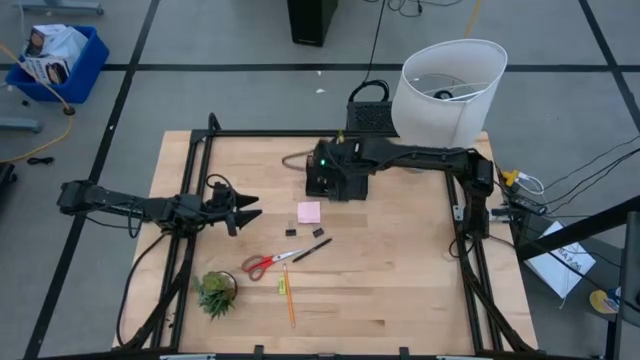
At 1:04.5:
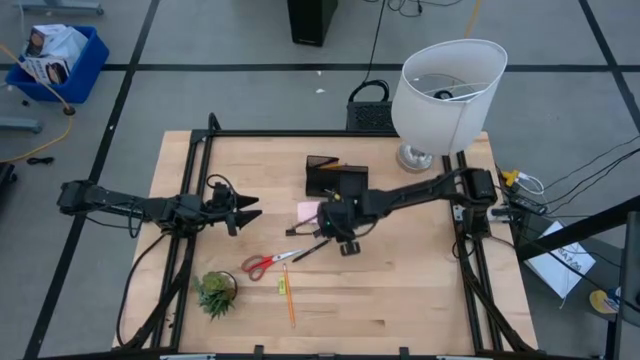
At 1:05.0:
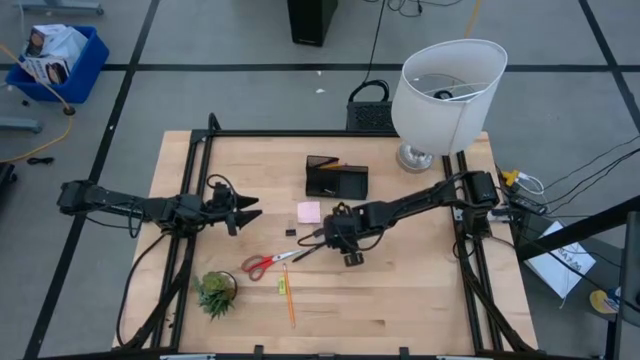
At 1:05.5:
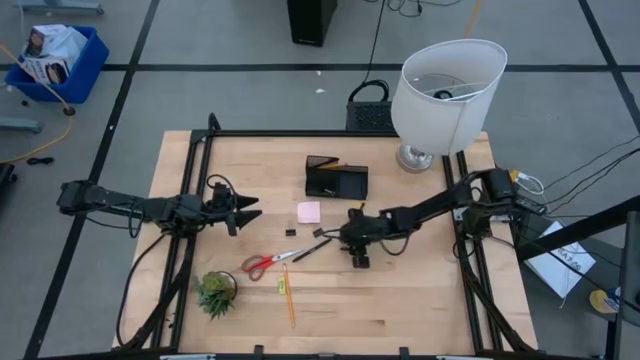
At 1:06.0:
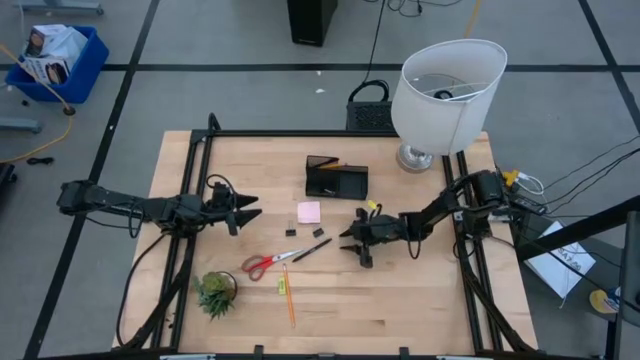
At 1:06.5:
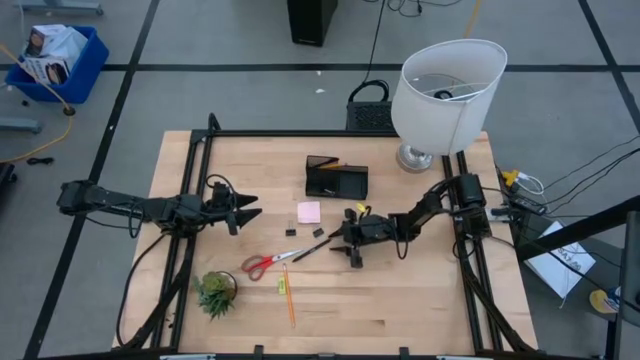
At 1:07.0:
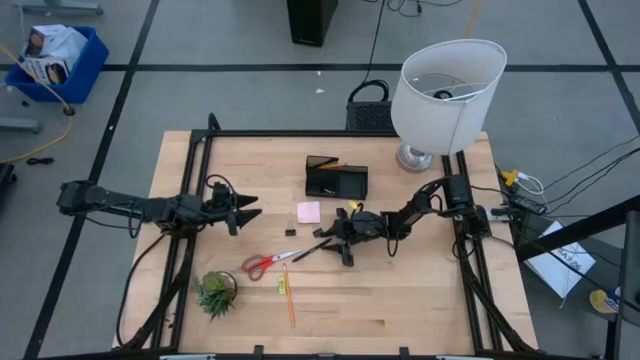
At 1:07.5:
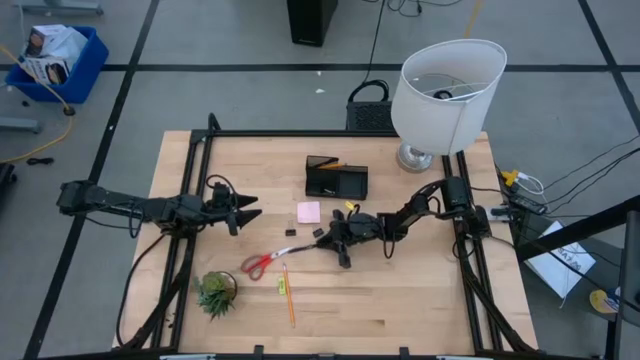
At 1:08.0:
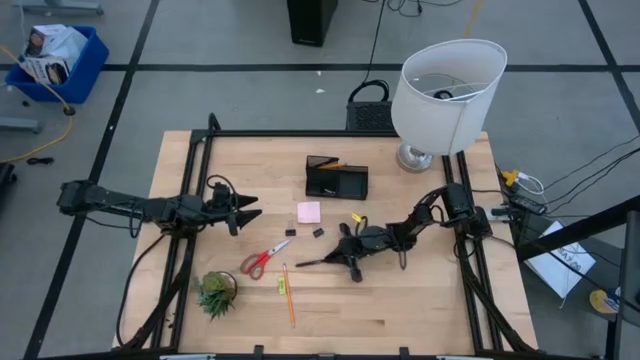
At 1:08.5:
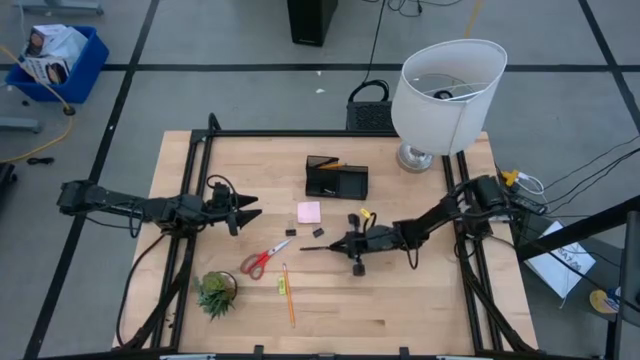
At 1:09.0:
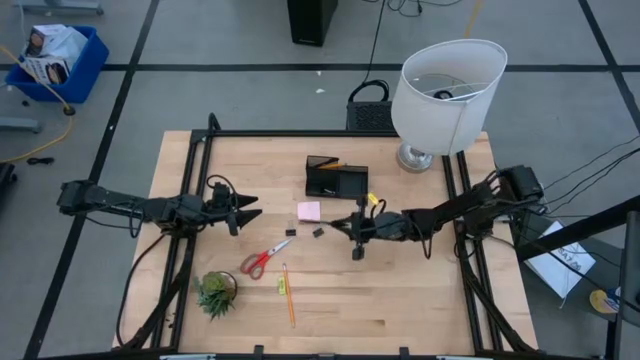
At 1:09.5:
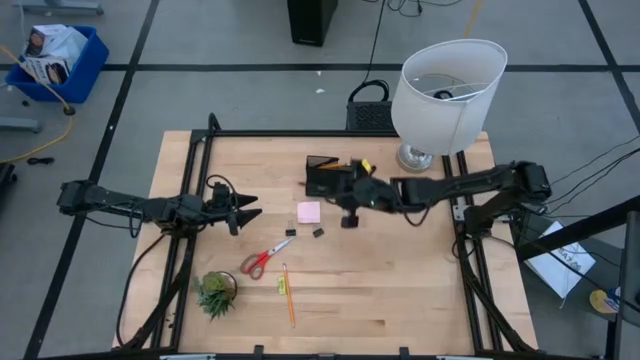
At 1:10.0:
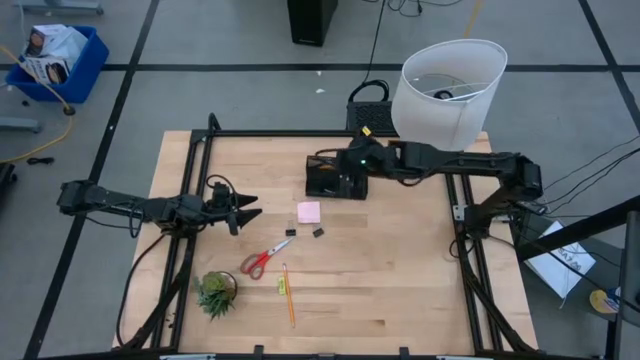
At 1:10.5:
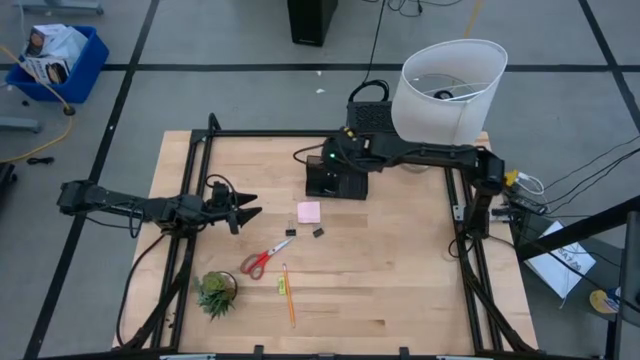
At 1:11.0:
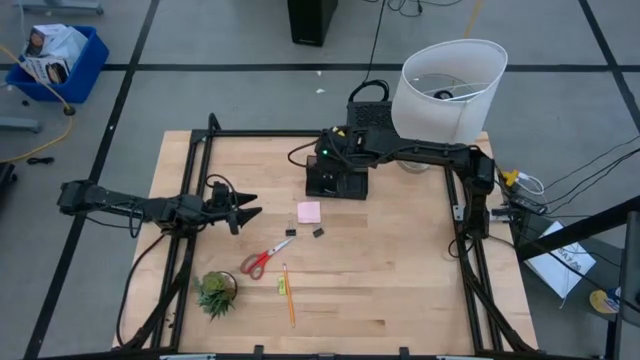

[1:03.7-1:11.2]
Task: Pick and place office supplies into organizer
Put the black ball pen into the desk organizer

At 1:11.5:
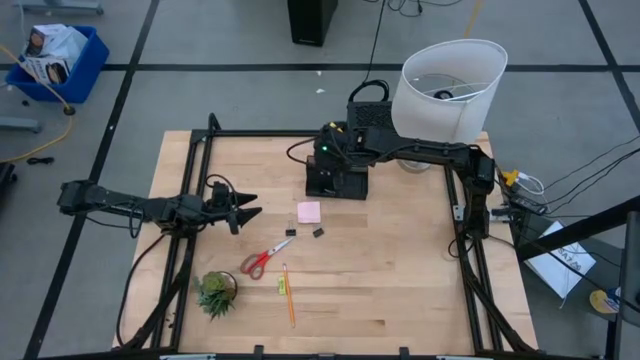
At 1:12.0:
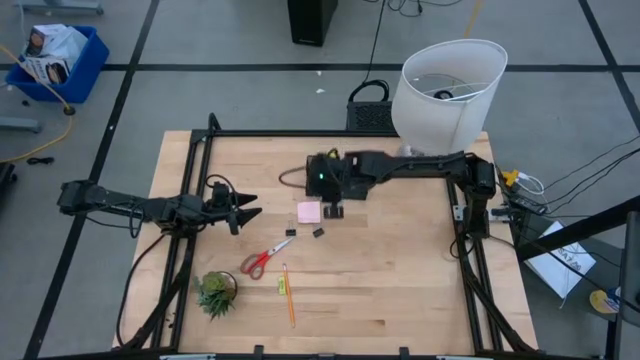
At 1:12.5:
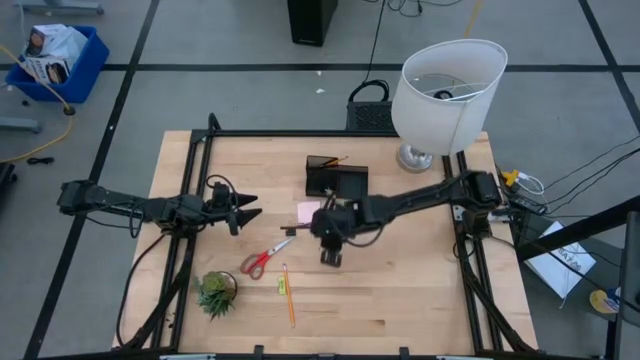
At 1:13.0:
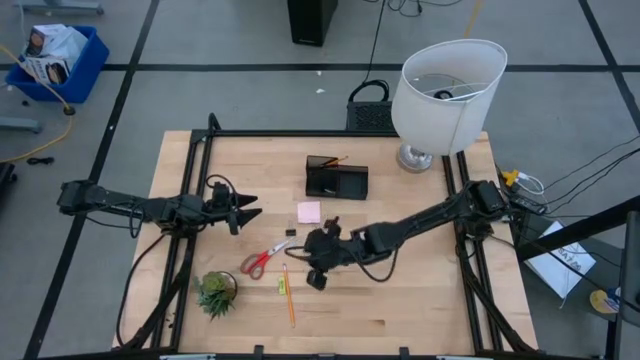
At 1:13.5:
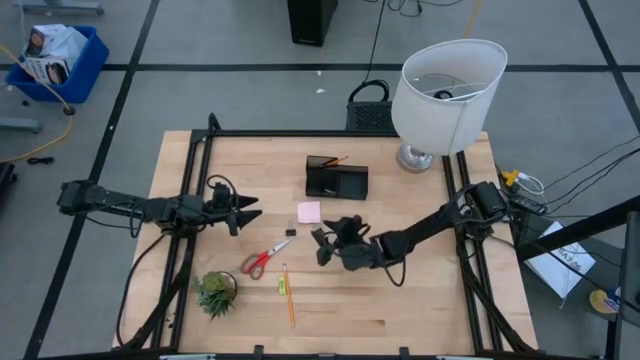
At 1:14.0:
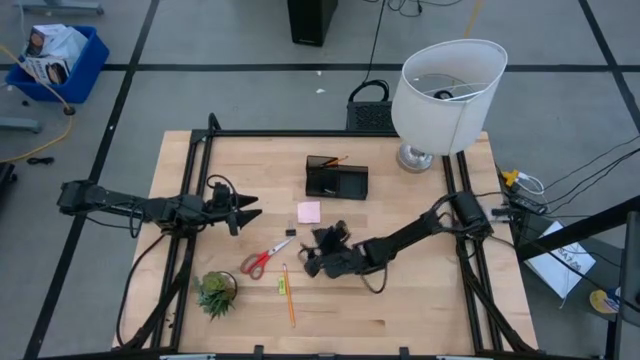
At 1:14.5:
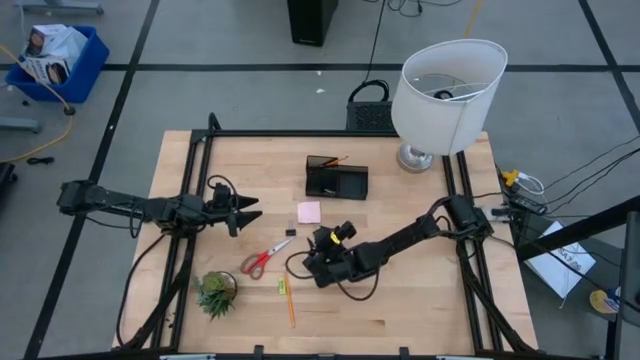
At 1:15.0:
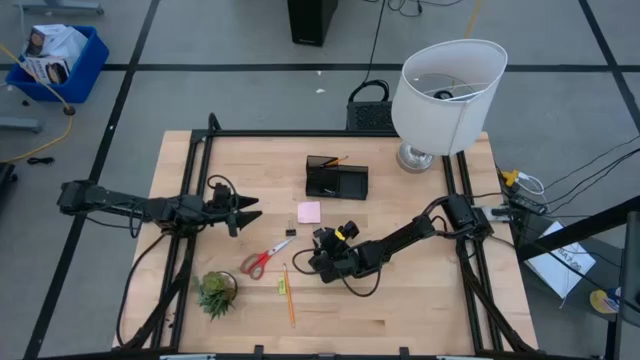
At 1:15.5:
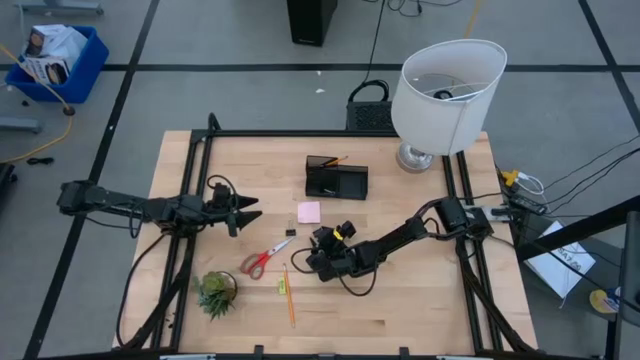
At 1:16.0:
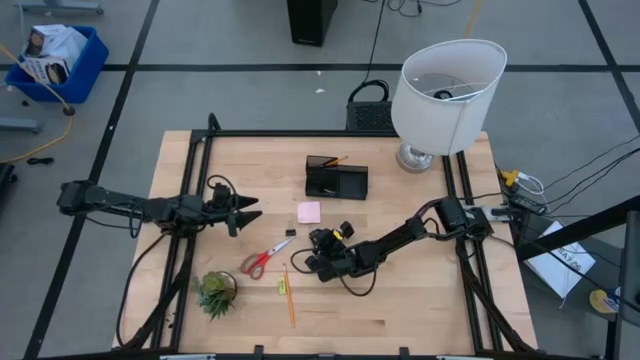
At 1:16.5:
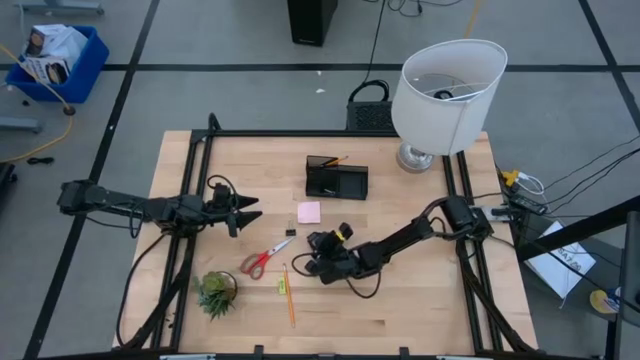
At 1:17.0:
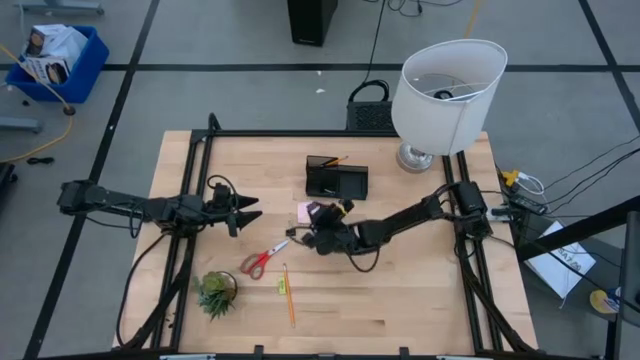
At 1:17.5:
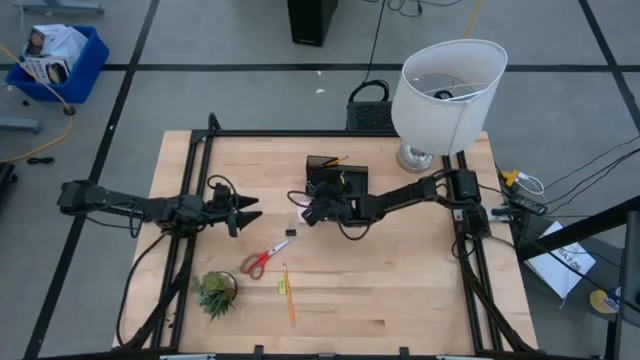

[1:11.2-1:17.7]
Put the right black paper clip into the desk organizer

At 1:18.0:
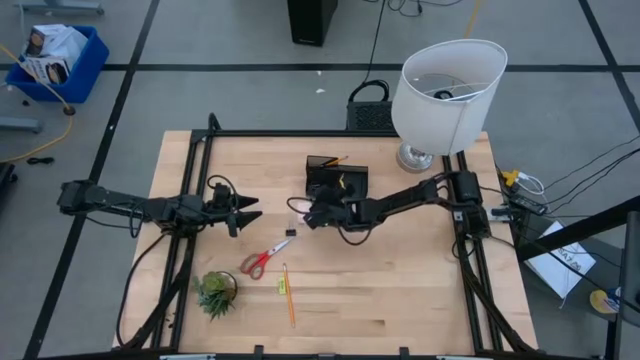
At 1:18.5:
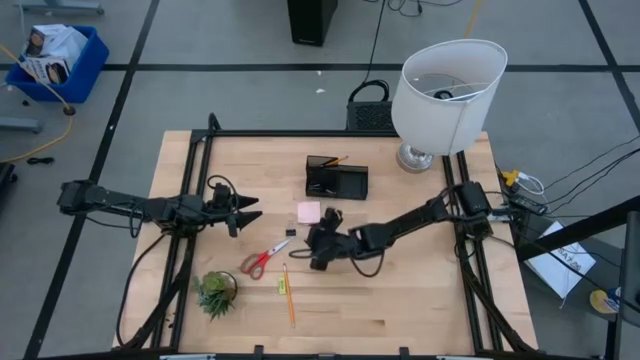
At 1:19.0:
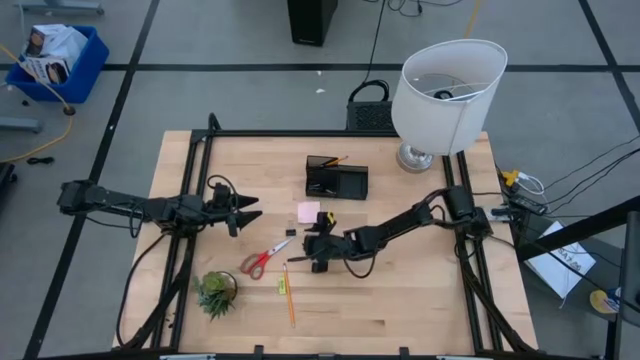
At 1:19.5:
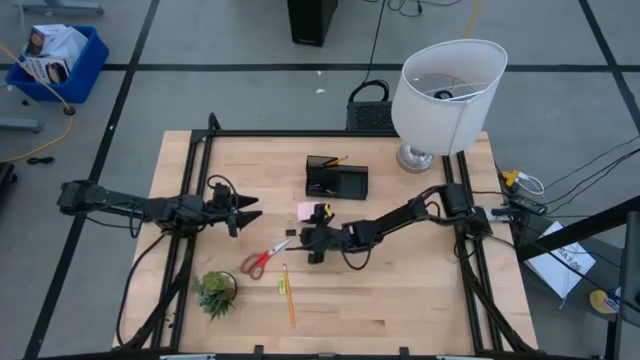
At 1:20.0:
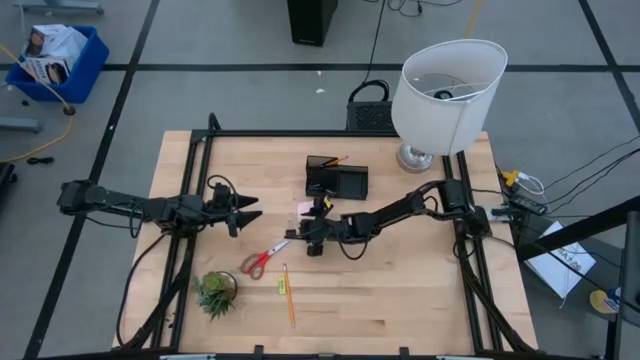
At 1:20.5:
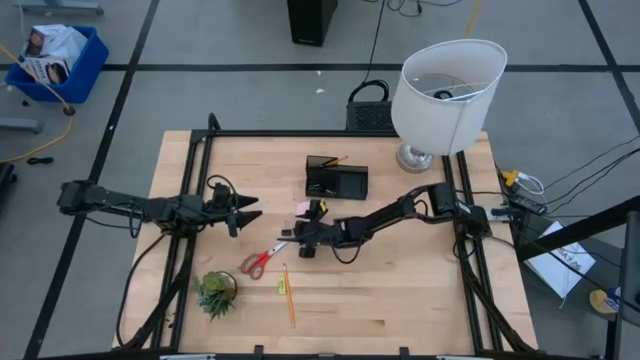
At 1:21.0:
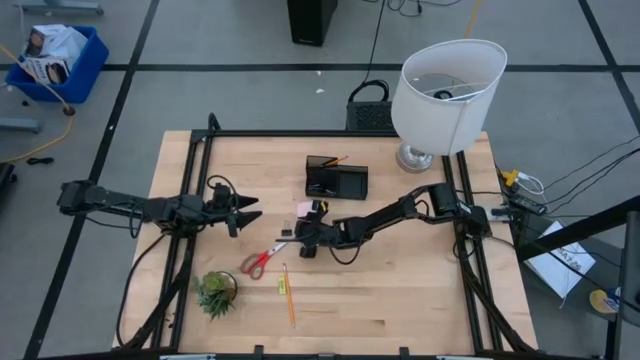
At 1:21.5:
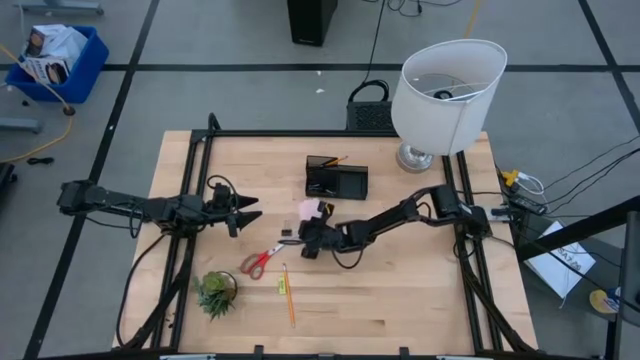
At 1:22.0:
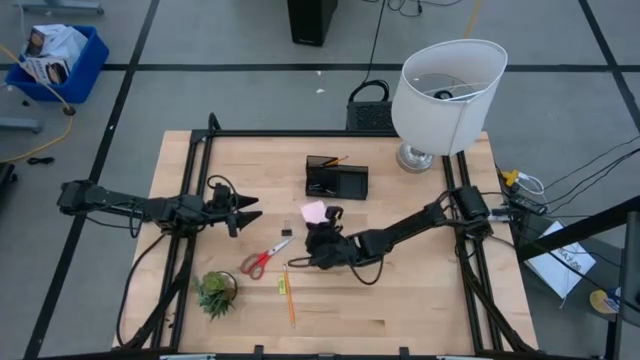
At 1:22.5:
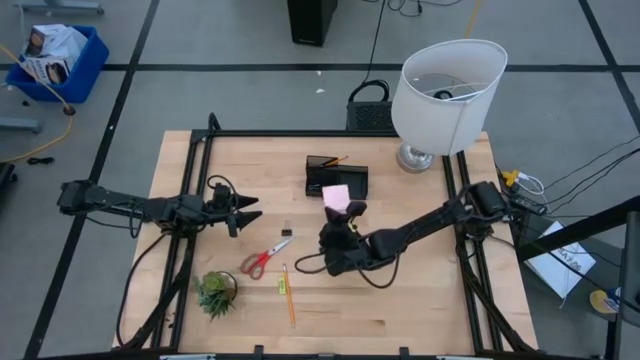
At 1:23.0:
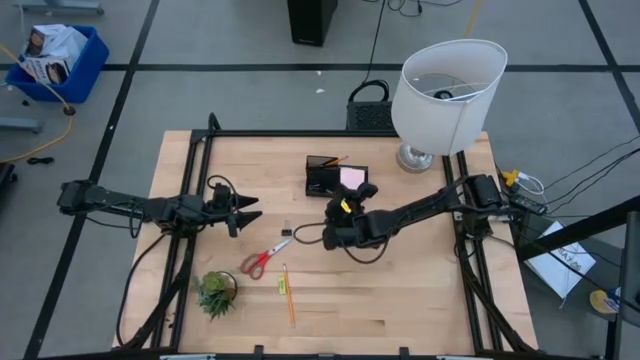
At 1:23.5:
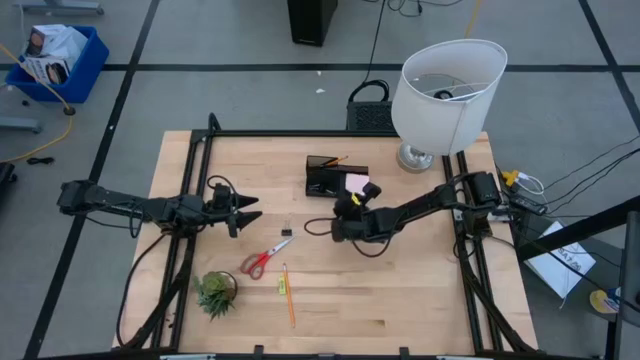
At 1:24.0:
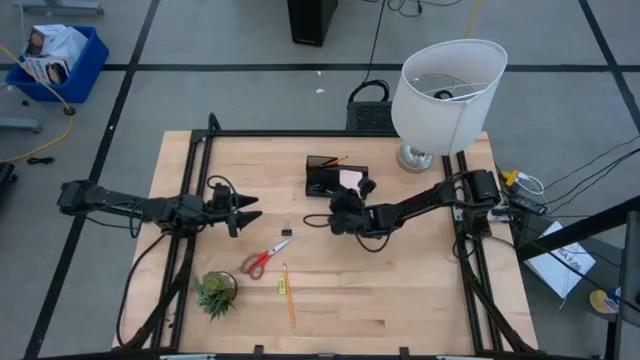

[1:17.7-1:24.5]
Put the white paper into the desk organizer
